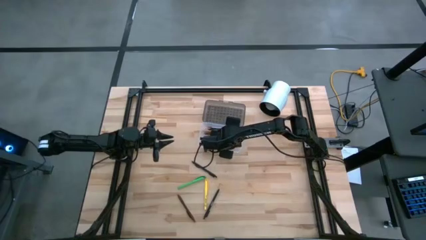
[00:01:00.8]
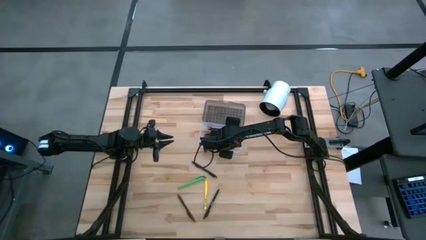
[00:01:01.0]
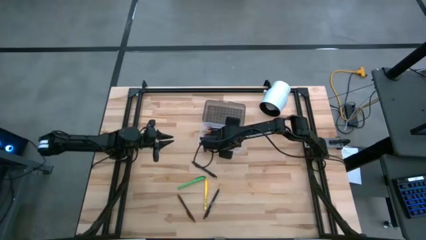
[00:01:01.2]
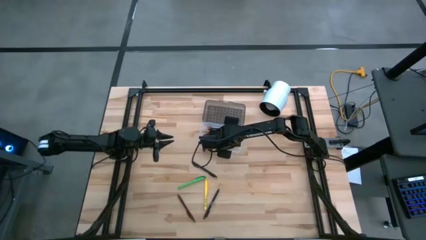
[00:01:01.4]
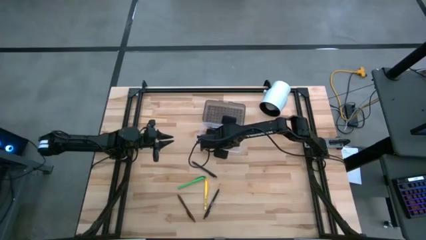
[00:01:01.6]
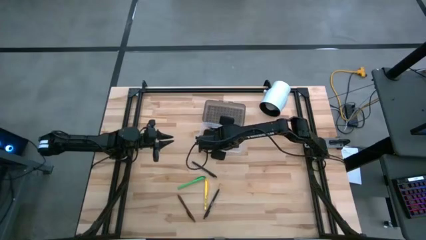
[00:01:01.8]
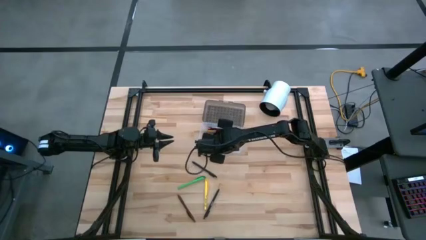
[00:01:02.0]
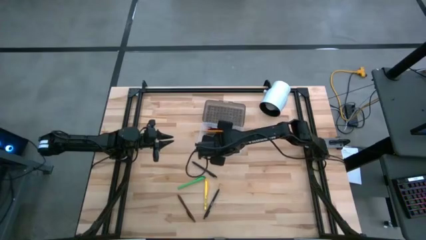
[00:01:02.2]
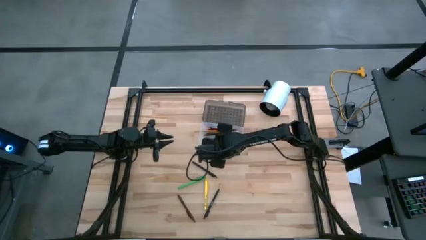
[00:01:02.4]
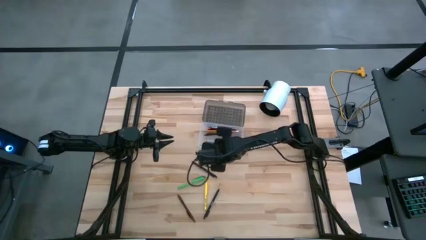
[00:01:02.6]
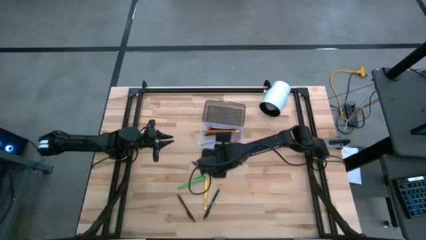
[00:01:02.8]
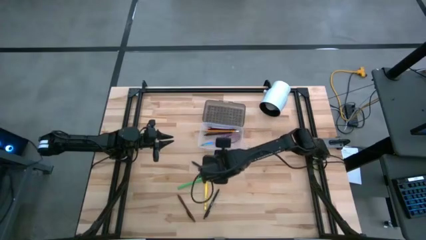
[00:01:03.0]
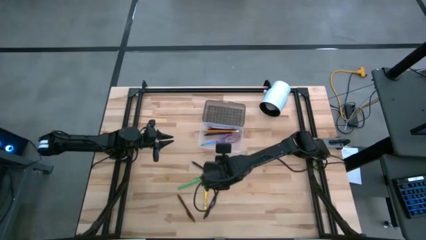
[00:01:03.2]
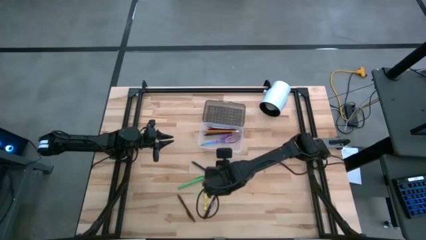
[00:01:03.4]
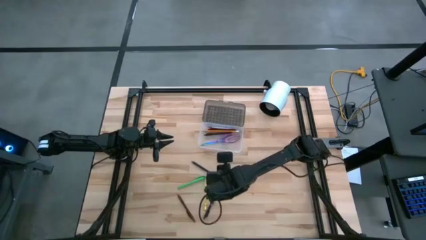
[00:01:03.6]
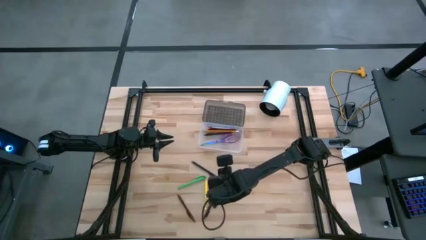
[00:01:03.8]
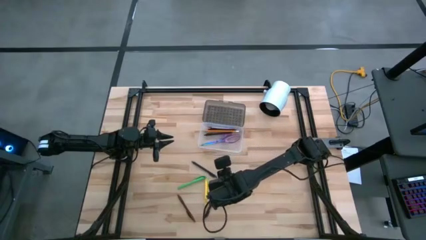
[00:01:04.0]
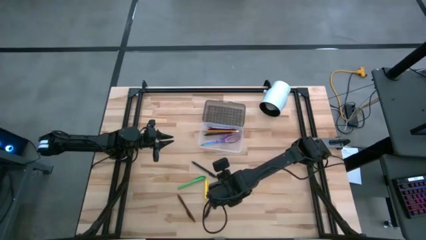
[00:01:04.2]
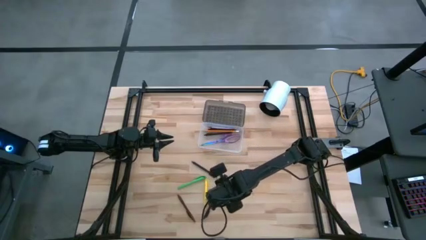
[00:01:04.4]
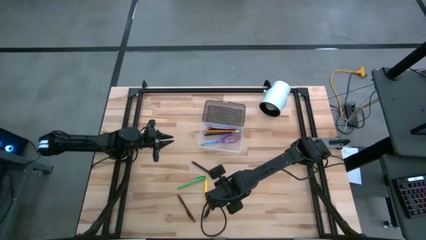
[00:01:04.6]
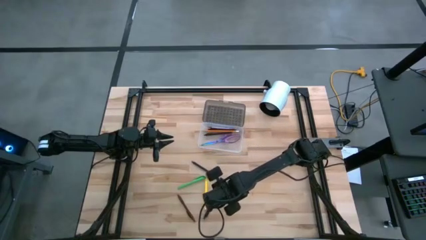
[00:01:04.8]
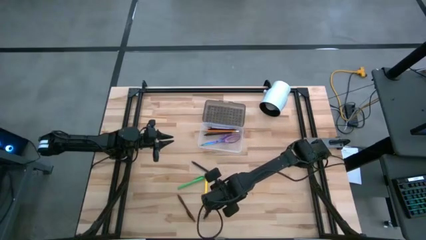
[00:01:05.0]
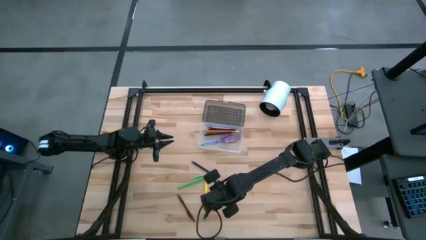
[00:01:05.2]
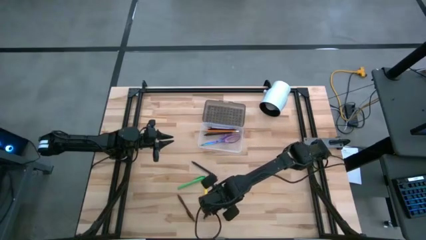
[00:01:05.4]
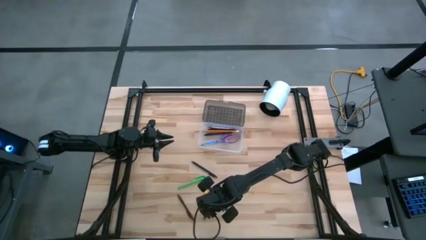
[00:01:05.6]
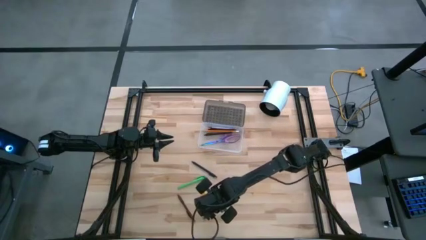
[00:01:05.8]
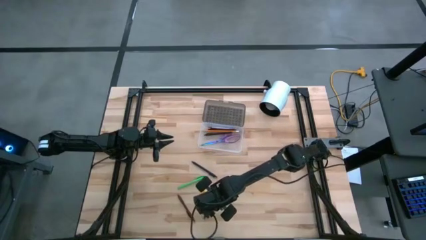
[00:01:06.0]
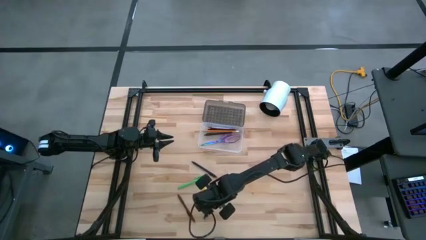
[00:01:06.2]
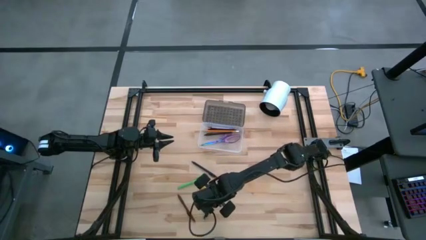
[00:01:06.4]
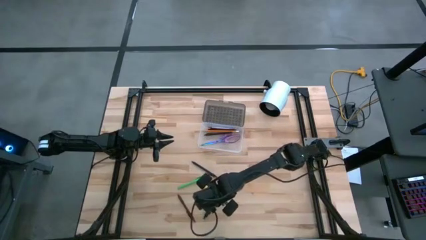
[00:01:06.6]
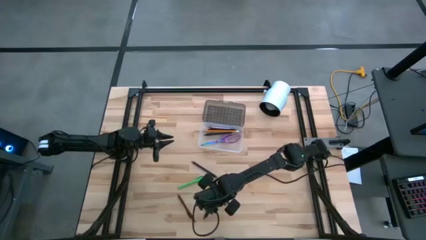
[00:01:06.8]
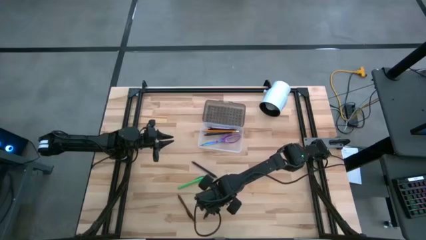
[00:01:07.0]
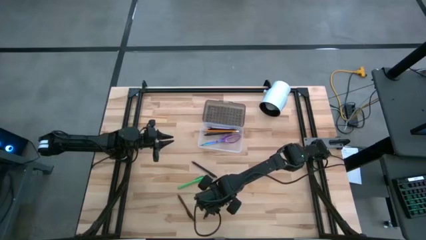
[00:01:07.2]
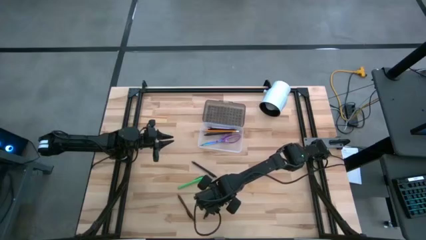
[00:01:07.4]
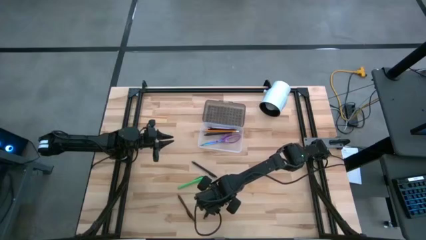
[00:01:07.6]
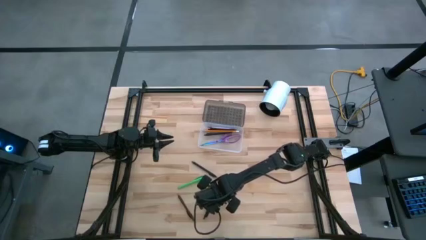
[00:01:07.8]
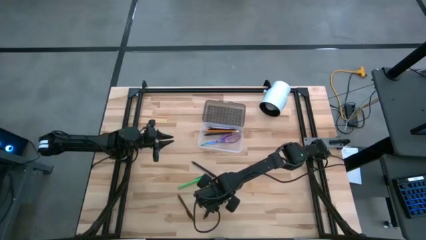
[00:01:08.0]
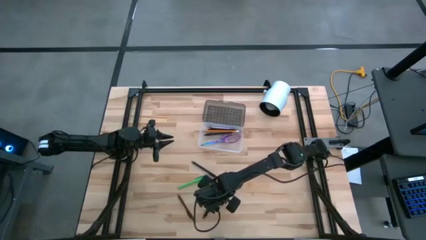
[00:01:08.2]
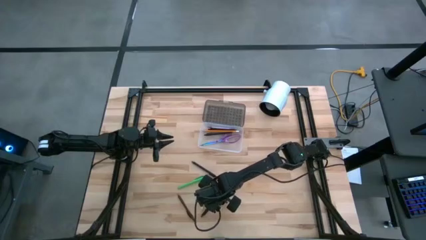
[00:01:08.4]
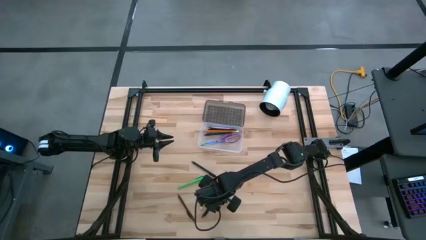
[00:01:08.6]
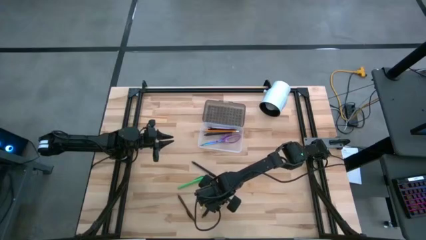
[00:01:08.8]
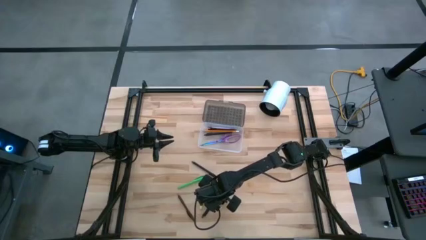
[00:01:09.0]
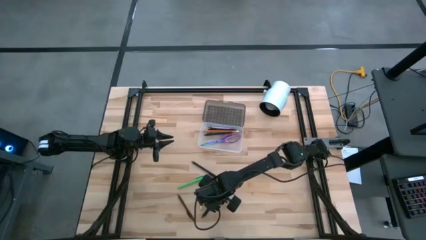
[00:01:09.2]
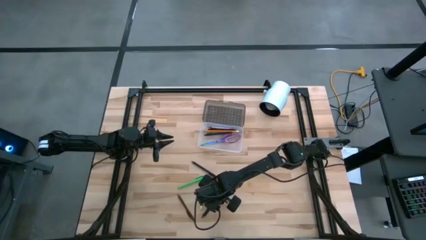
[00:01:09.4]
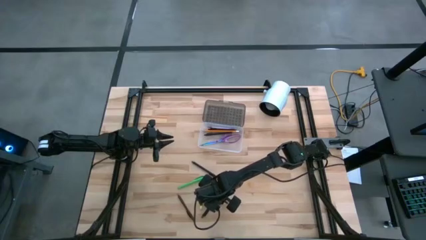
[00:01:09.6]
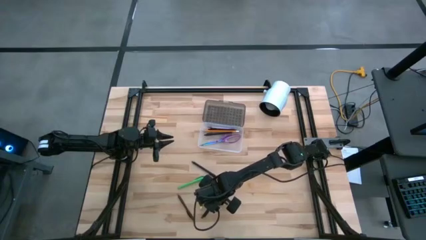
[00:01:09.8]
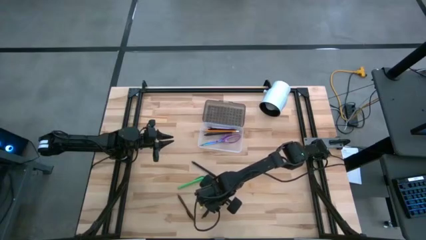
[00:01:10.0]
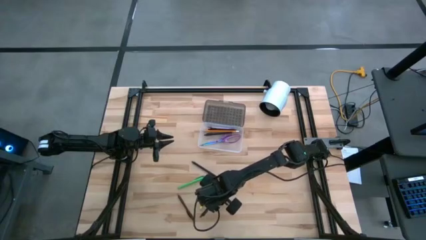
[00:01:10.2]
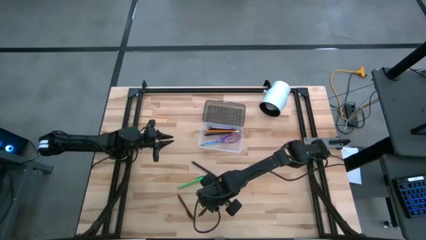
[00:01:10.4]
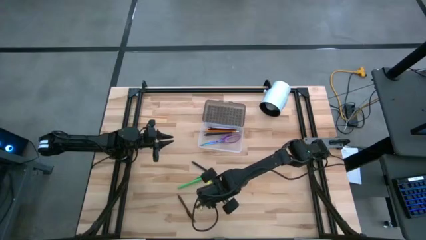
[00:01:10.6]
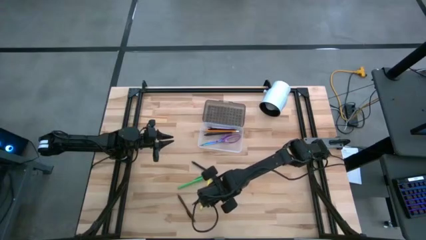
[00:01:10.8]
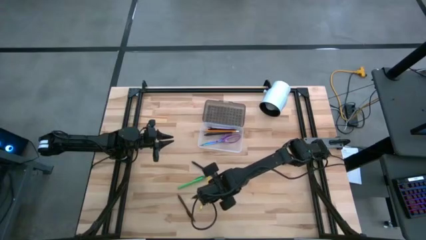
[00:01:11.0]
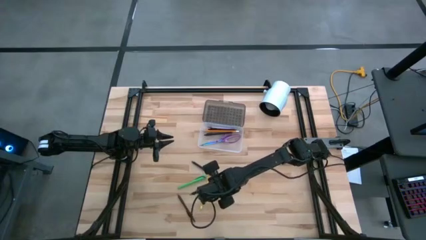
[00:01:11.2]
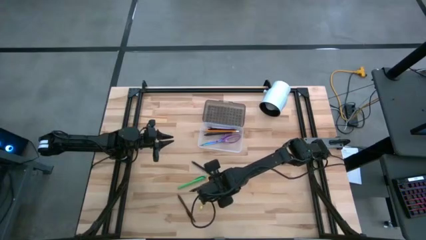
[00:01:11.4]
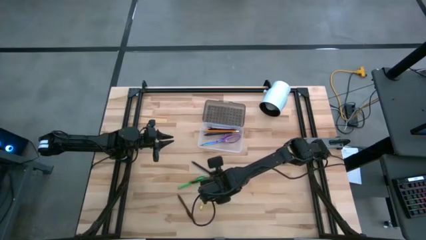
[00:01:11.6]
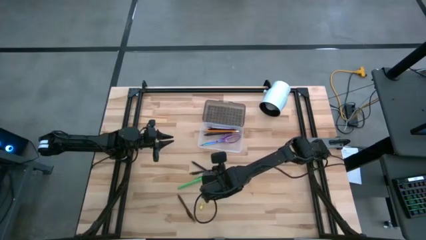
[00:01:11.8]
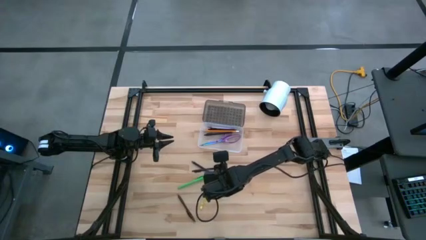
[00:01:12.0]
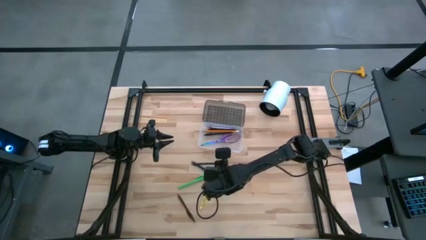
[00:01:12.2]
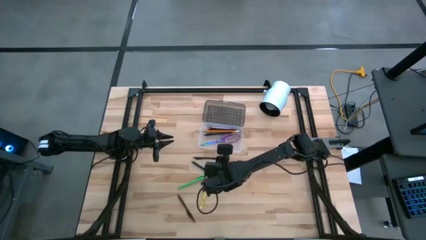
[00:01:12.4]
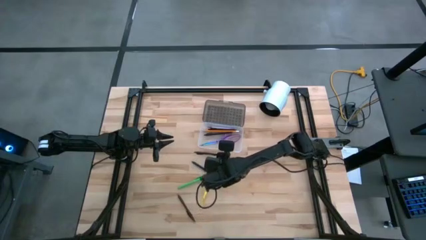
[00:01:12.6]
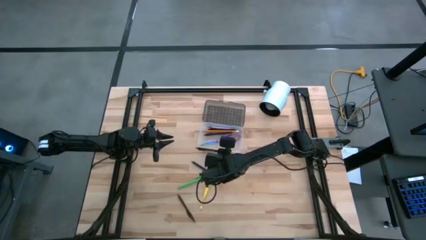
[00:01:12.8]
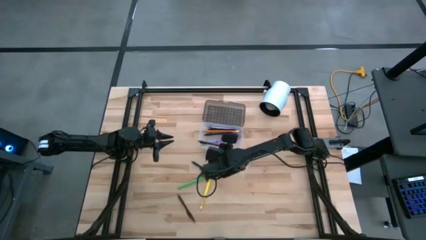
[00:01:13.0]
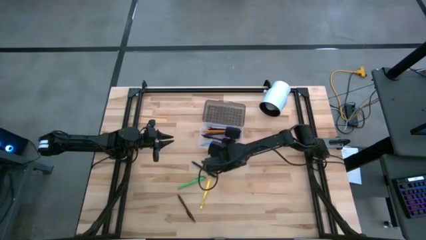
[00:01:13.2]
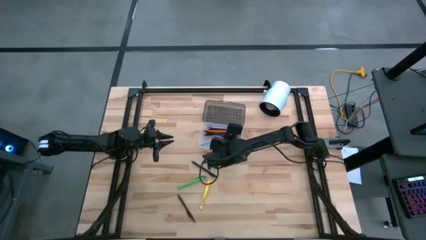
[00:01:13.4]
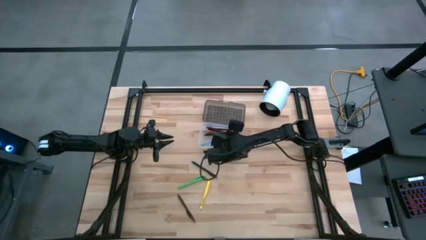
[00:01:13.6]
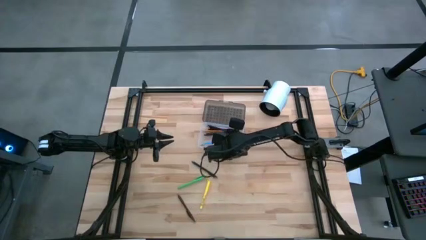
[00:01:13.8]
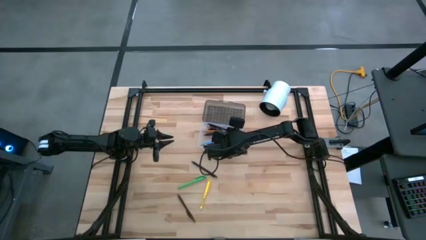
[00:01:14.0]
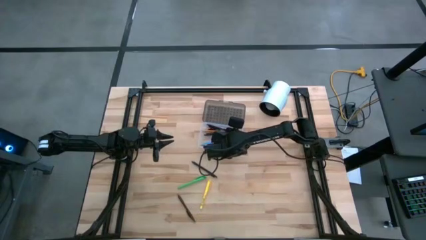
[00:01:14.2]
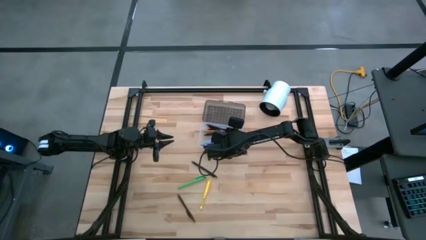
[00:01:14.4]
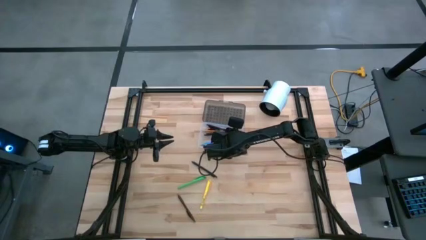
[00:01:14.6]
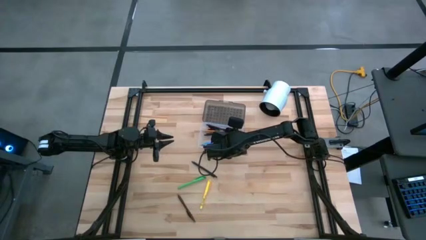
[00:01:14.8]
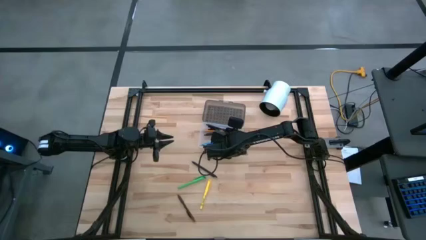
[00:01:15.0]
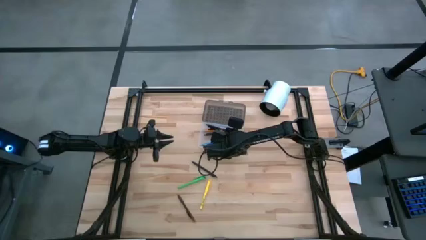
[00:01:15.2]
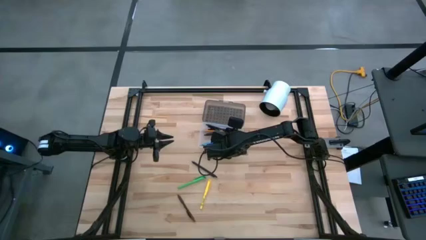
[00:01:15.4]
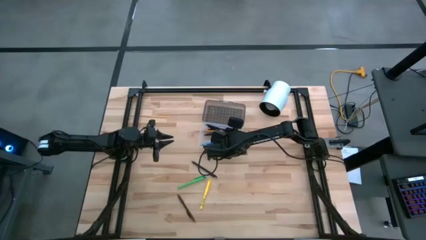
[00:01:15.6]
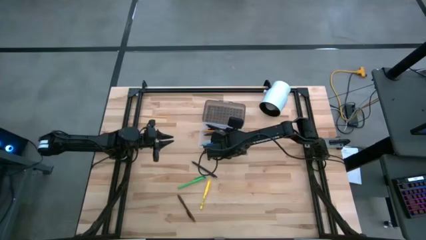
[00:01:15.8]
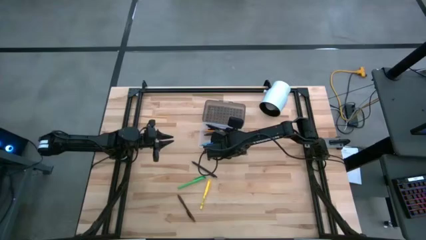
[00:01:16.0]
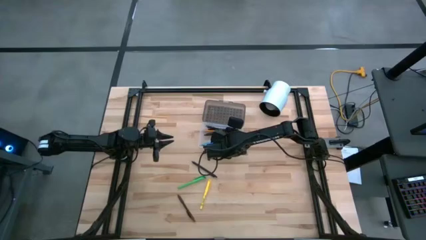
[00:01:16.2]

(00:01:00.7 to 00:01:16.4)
Task: Pick & place school supplies into a supply box
Put the black pen into the supply box
